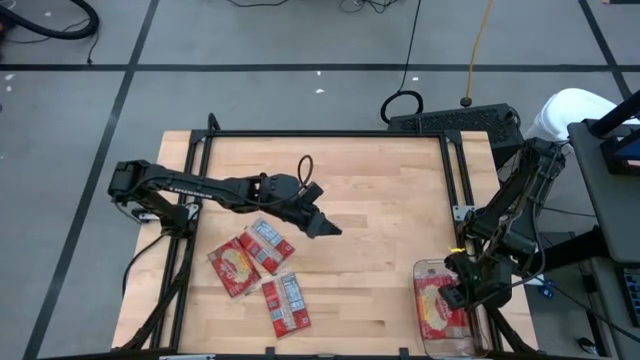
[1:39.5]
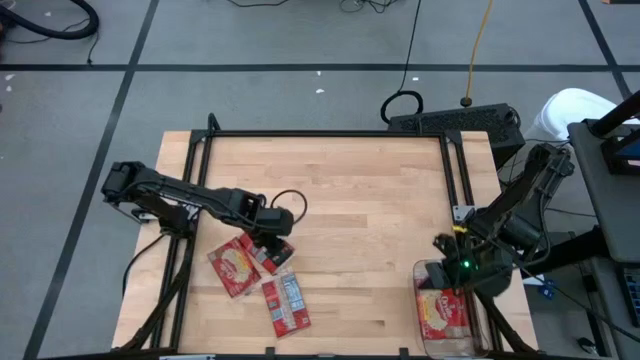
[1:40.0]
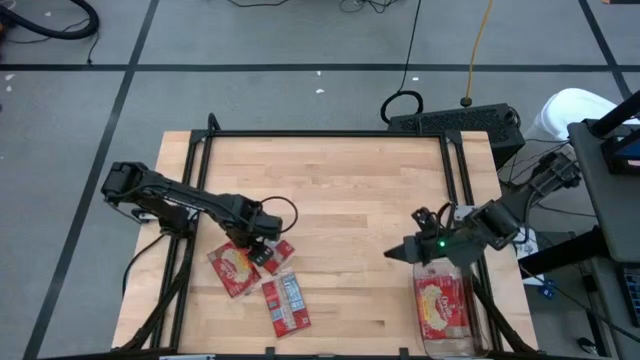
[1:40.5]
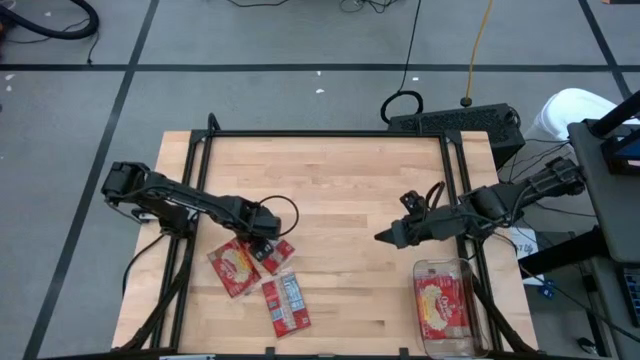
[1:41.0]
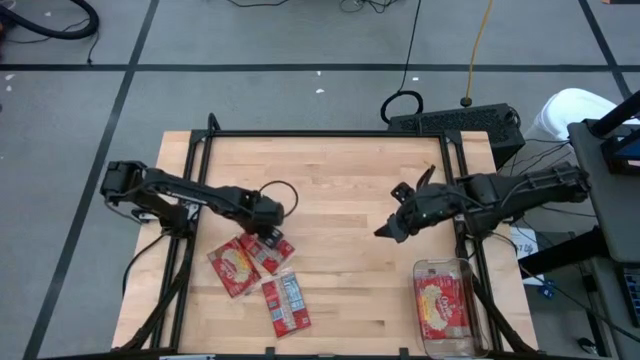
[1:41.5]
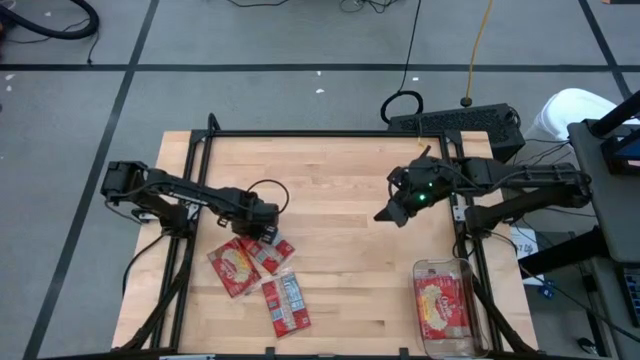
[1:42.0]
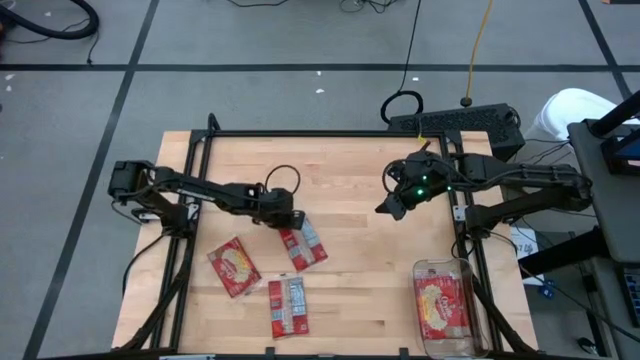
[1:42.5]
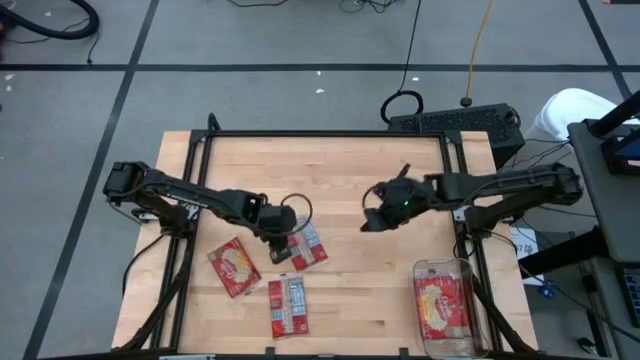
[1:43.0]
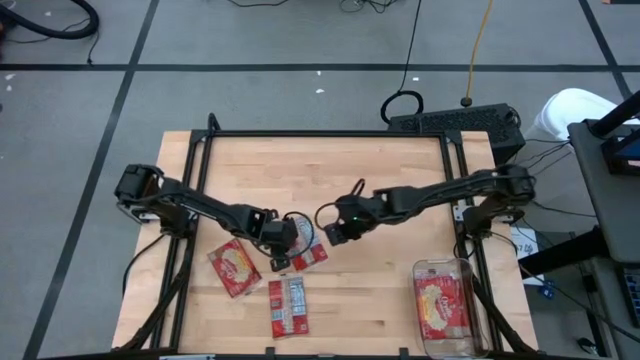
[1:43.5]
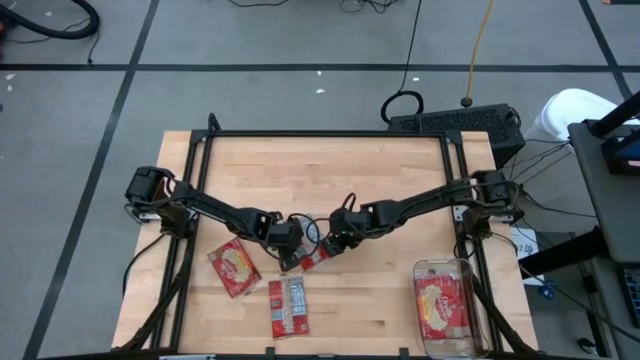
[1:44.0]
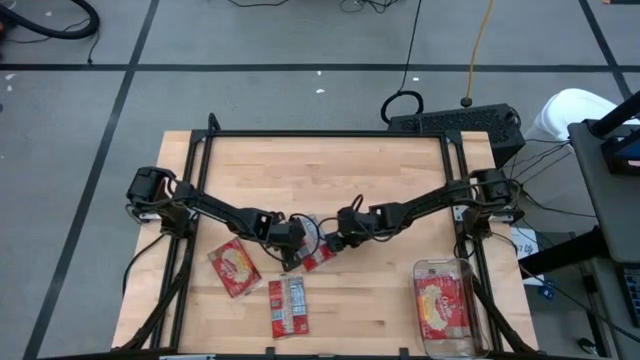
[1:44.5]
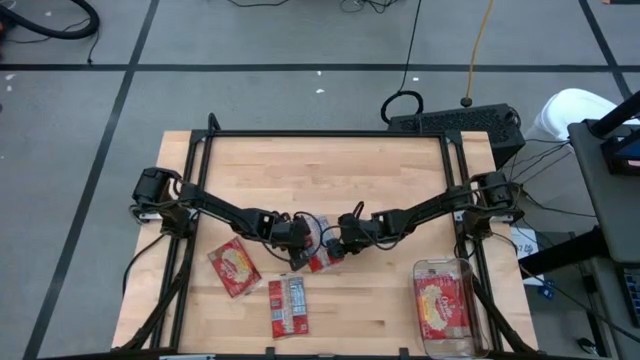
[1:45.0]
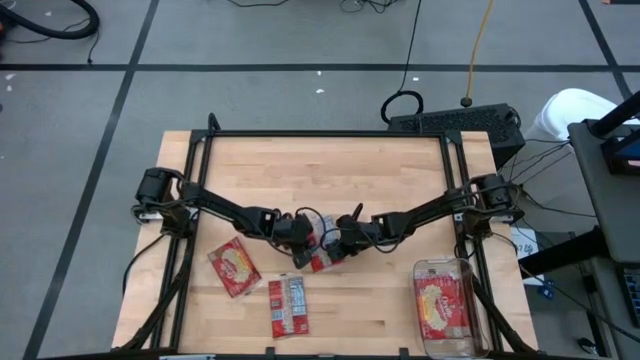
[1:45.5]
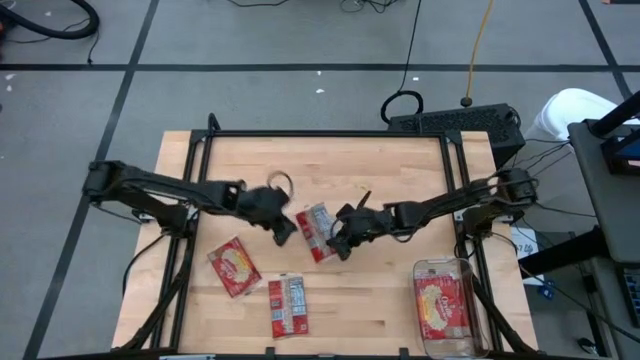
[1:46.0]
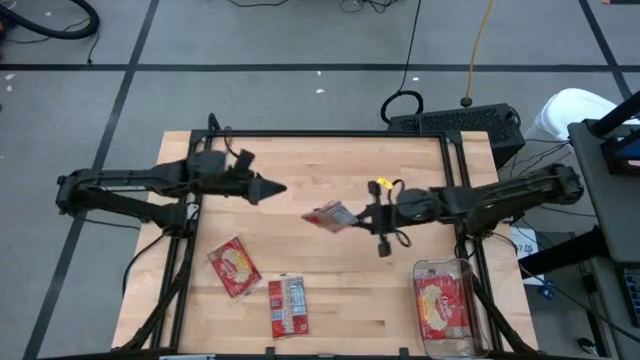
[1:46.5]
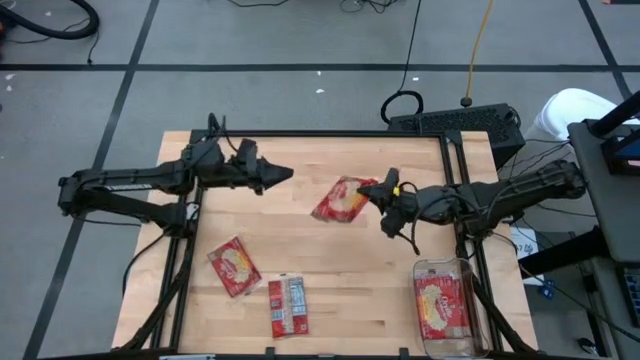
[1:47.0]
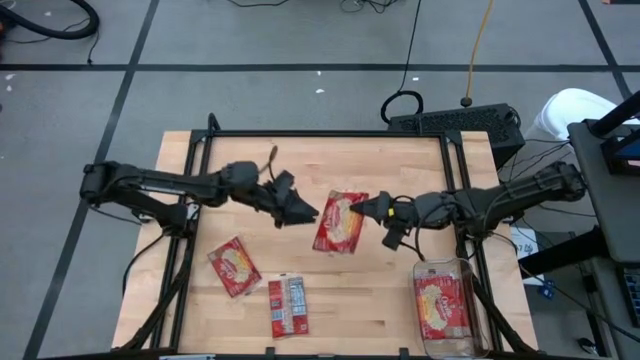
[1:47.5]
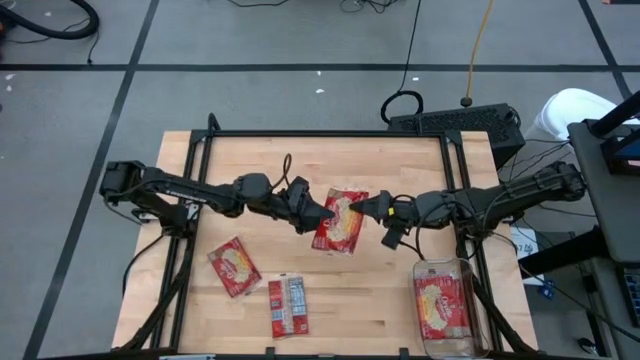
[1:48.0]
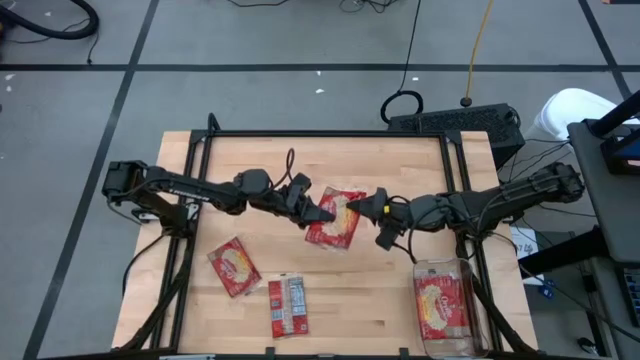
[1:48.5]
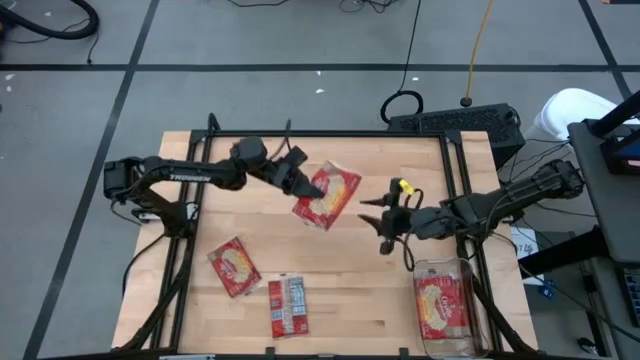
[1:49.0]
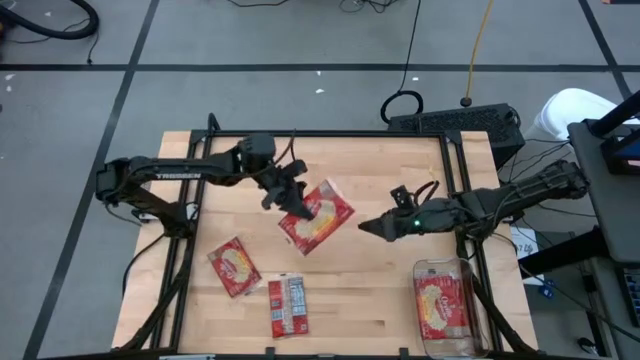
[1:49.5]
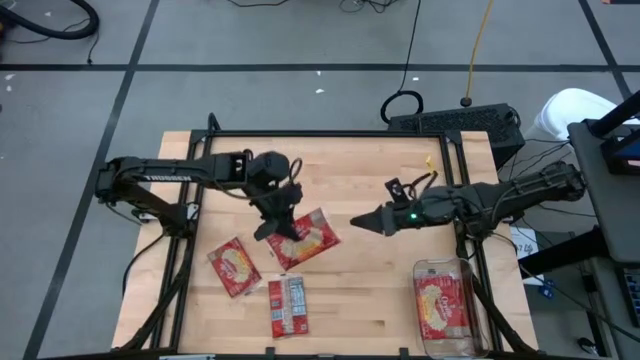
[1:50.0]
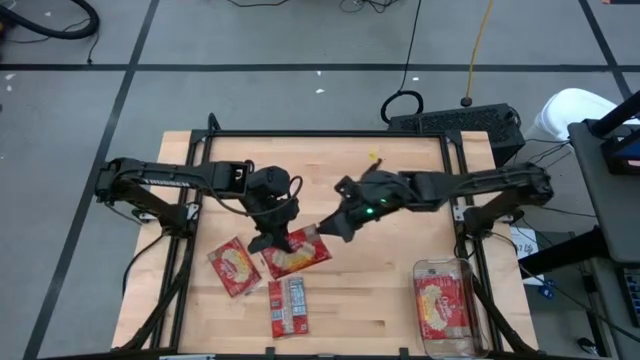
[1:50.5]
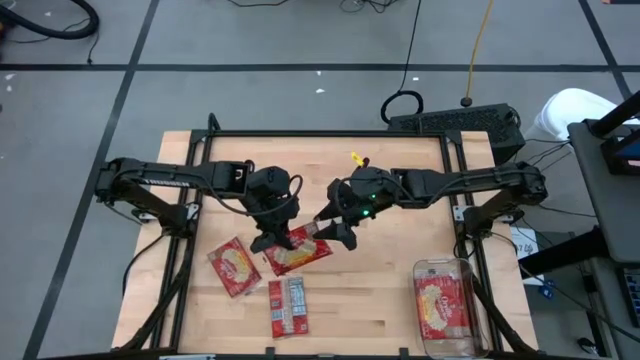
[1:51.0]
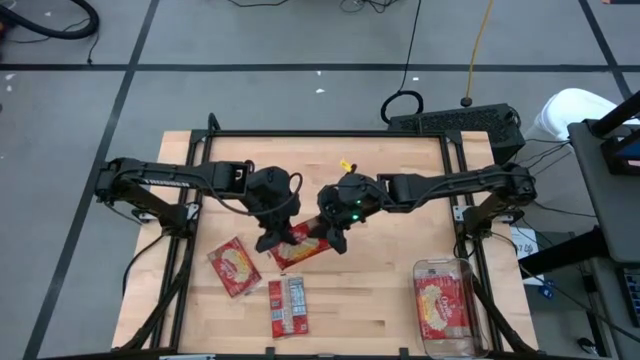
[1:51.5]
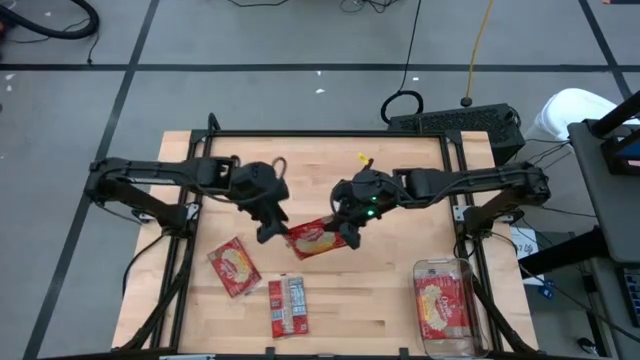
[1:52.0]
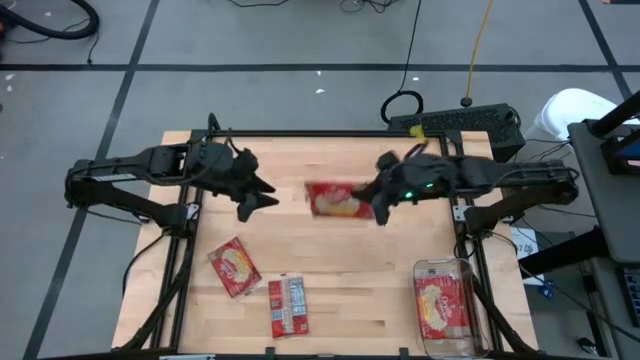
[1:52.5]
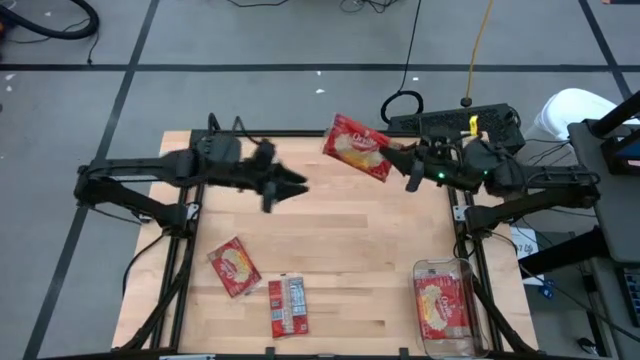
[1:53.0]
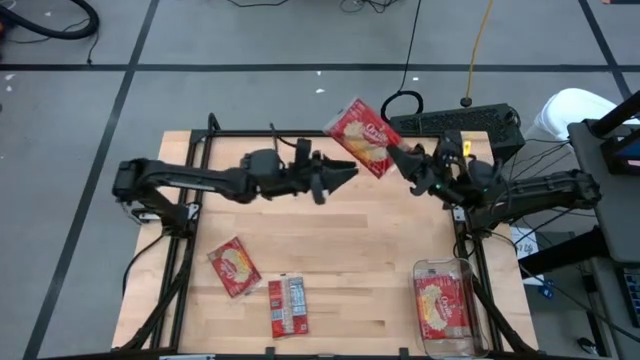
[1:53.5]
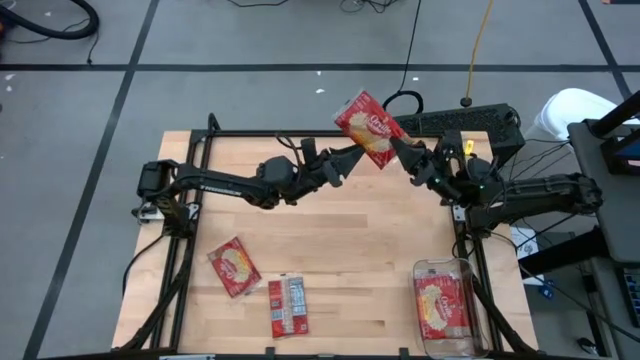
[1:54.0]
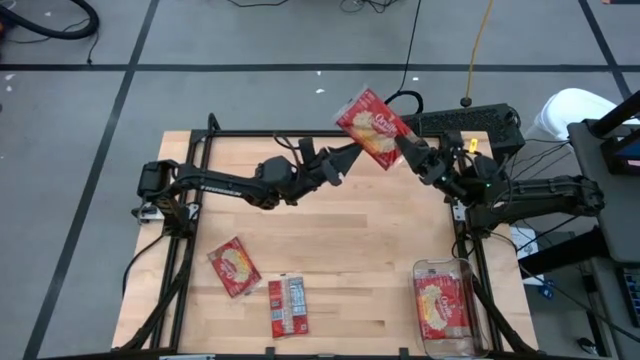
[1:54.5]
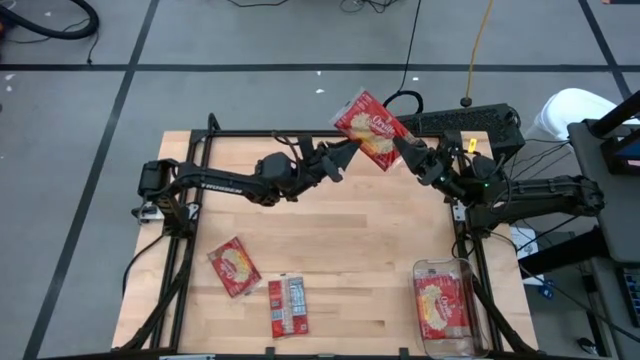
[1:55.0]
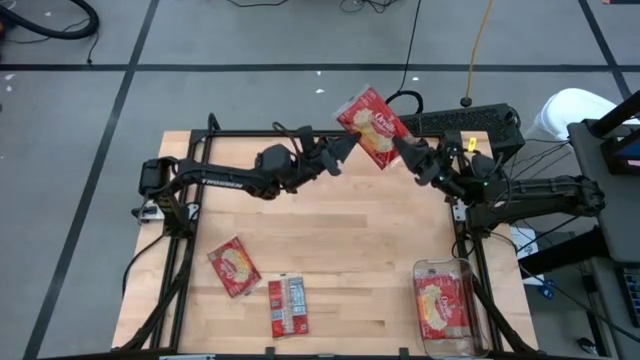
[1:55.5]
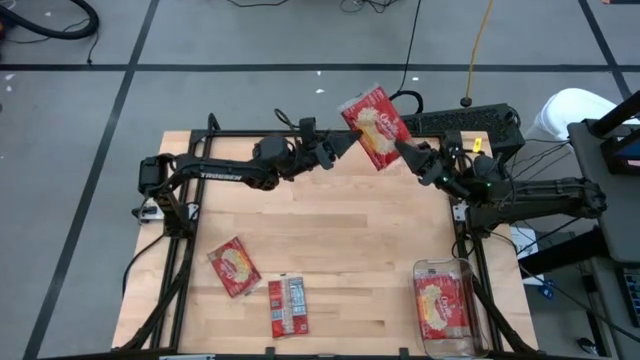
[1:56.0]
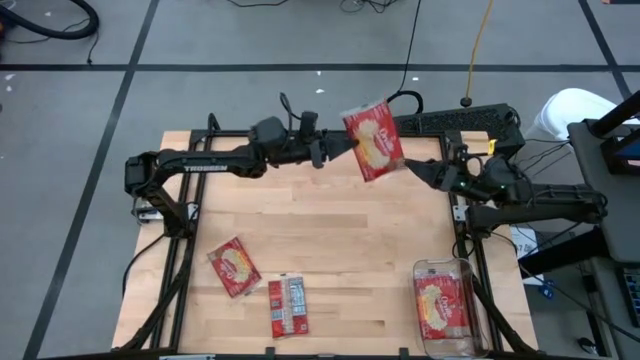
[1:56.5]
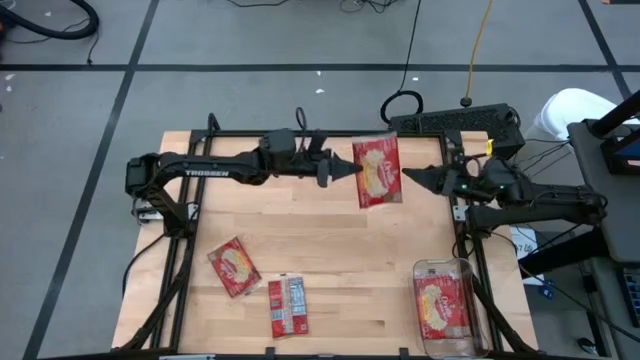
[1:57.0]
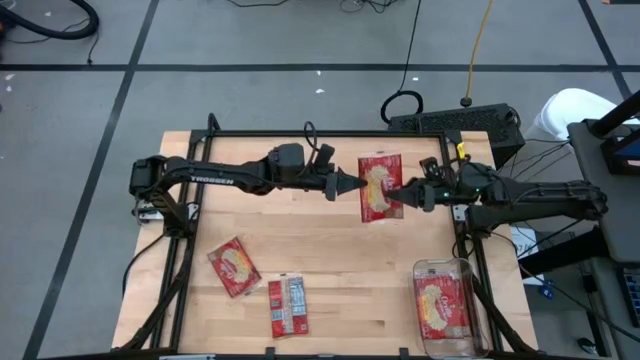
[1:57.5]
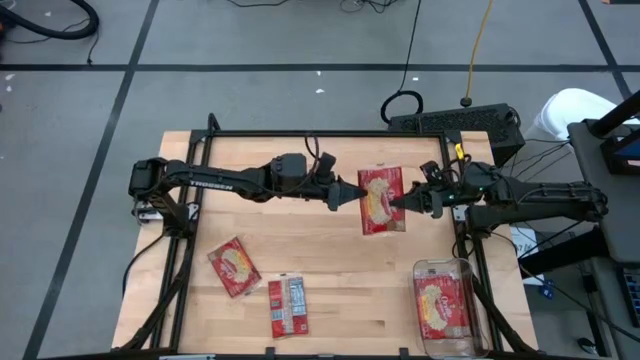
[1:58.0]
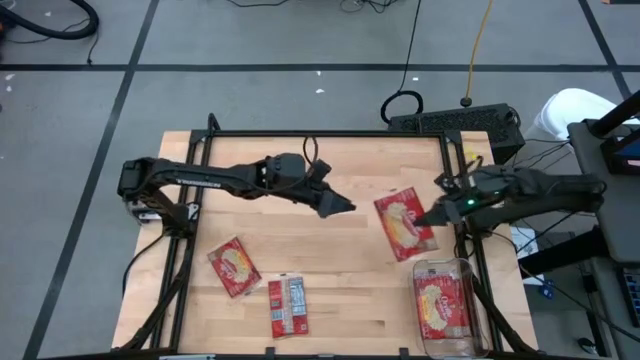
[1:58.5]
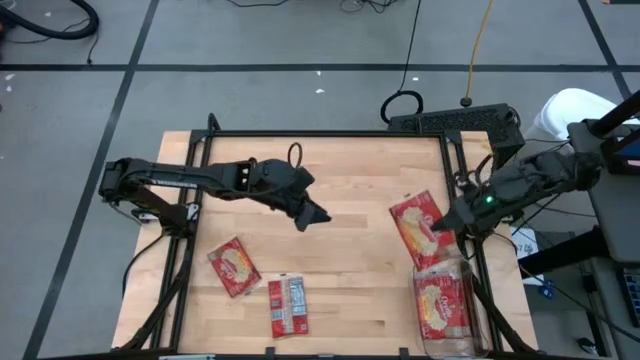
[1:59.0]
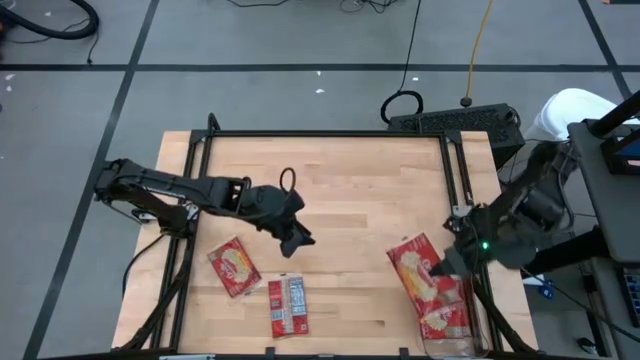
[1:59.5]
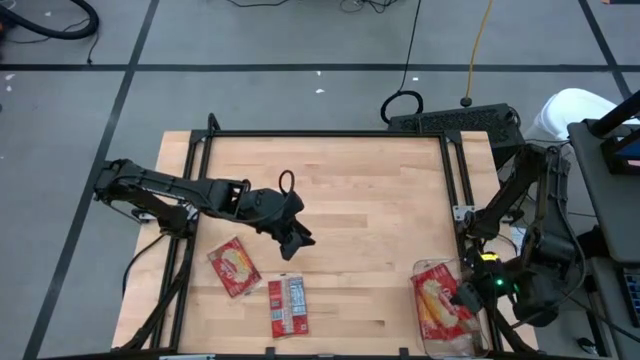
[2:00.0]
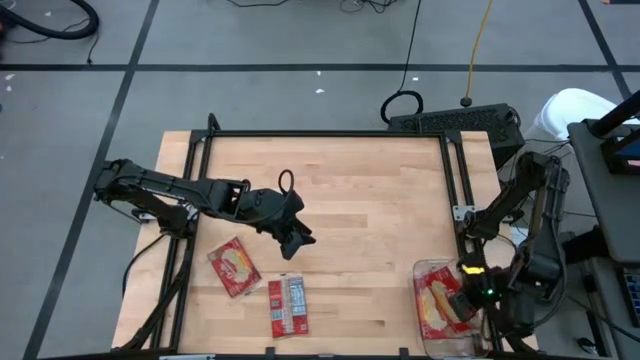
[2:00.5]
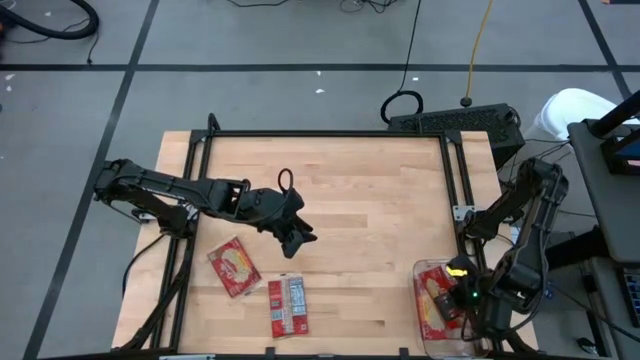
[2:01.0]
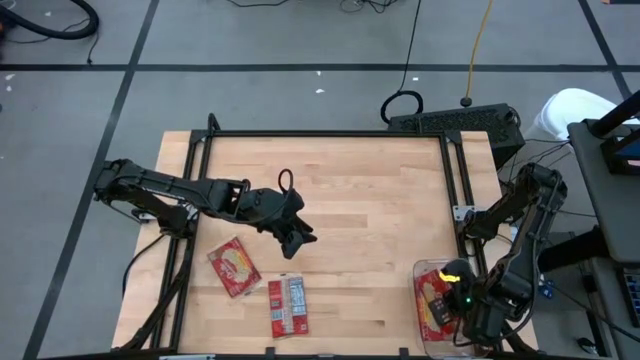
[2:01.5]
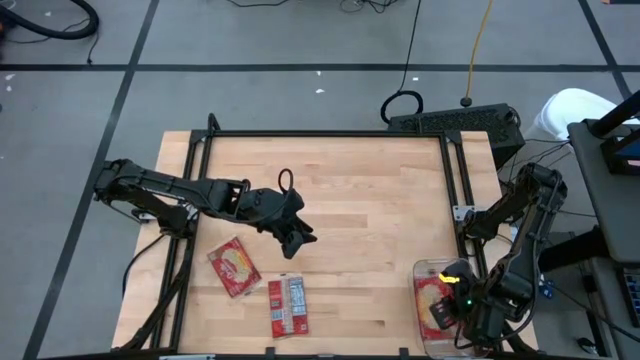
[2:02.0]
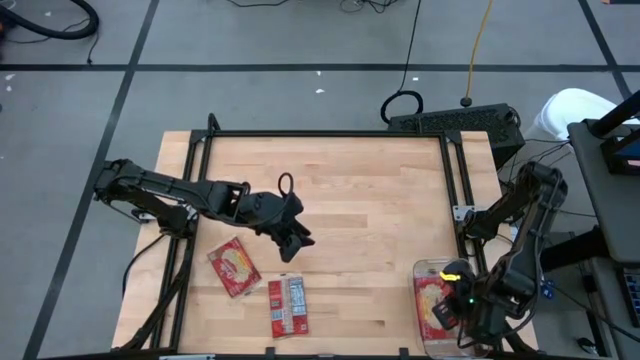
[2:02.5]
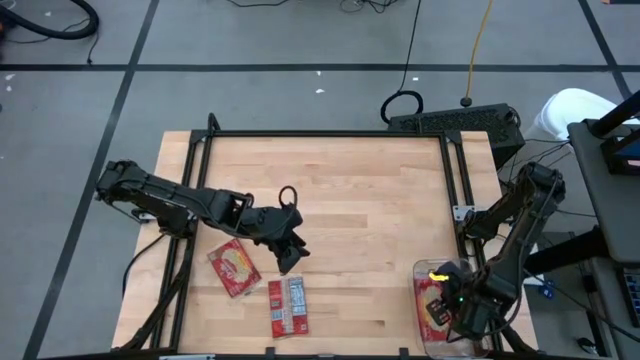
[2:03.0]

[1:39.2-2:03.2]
Task: Sort popcorn bags into baskets
Put the popcorn bag into the transparent bin
